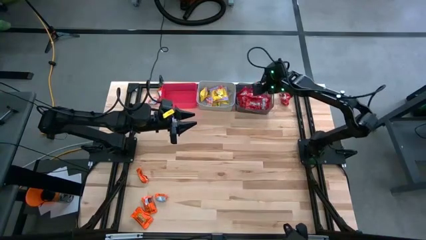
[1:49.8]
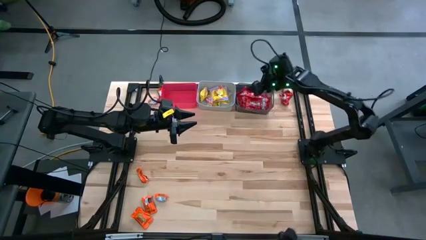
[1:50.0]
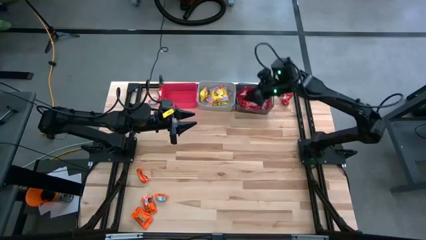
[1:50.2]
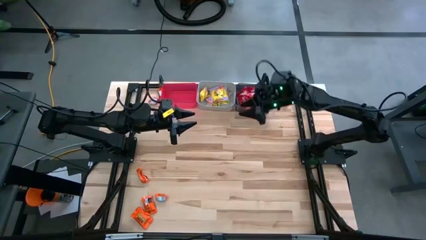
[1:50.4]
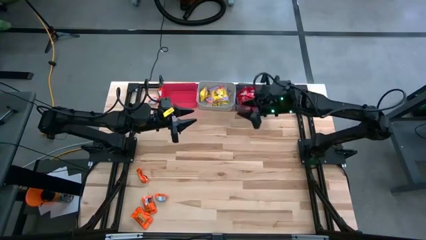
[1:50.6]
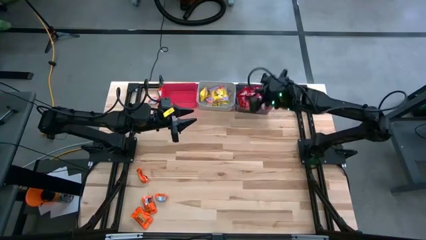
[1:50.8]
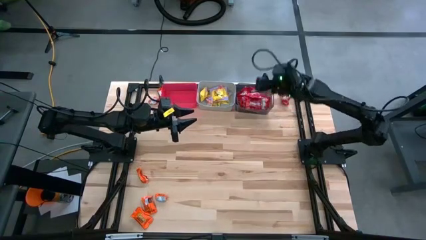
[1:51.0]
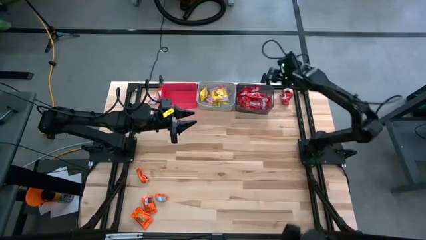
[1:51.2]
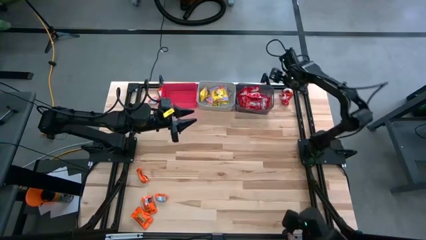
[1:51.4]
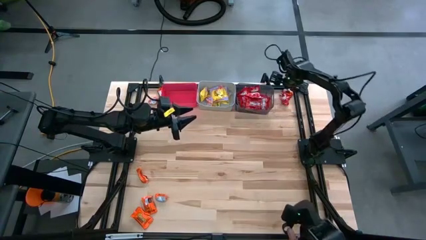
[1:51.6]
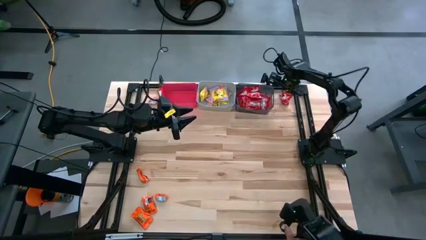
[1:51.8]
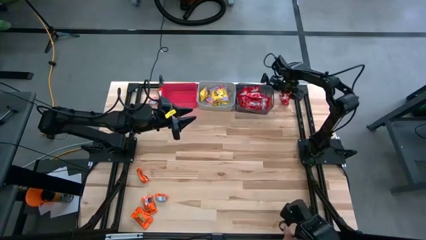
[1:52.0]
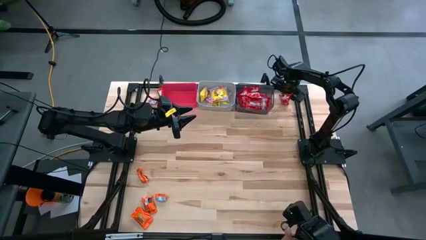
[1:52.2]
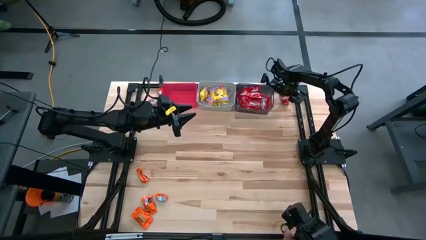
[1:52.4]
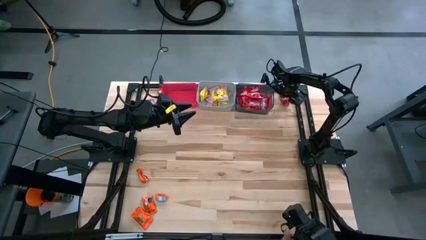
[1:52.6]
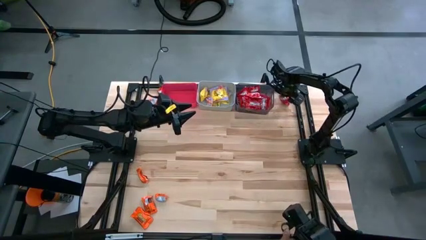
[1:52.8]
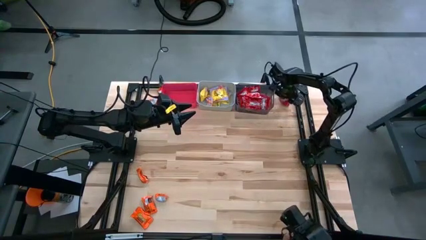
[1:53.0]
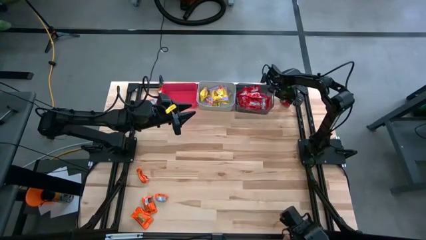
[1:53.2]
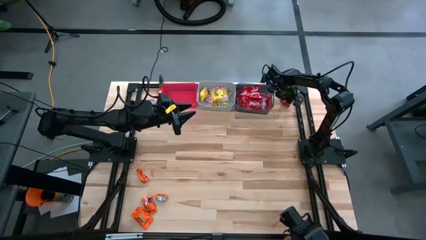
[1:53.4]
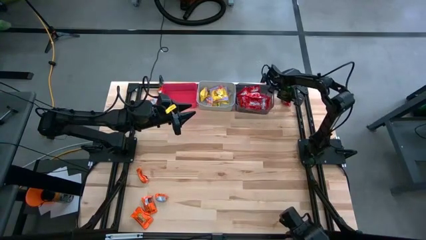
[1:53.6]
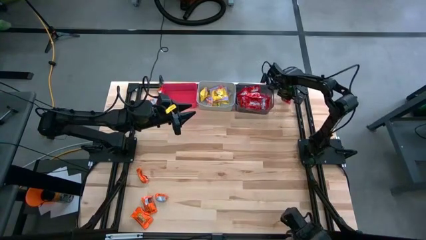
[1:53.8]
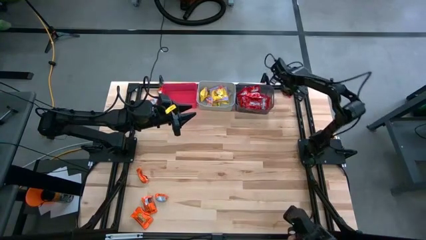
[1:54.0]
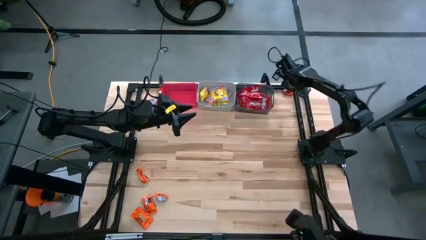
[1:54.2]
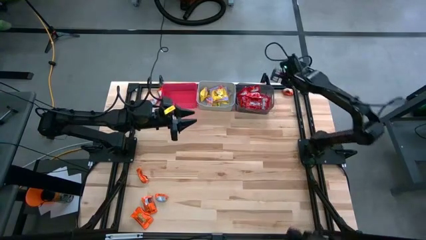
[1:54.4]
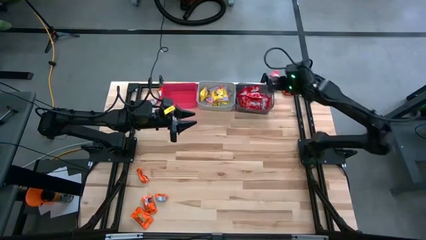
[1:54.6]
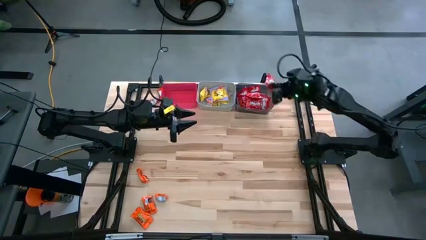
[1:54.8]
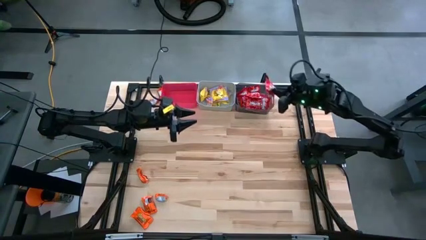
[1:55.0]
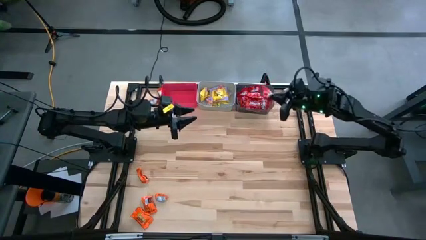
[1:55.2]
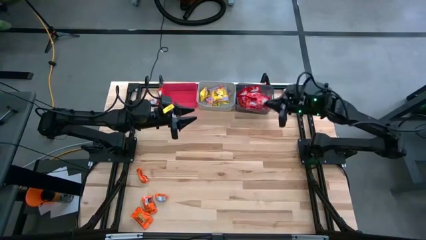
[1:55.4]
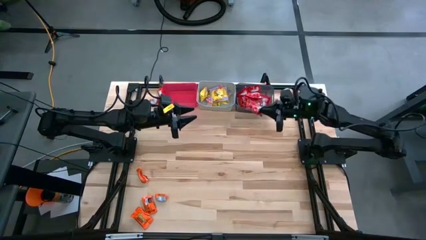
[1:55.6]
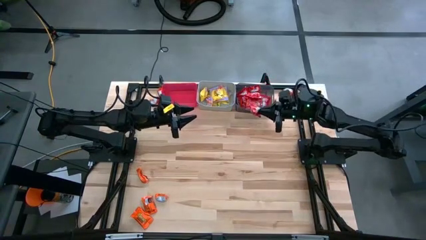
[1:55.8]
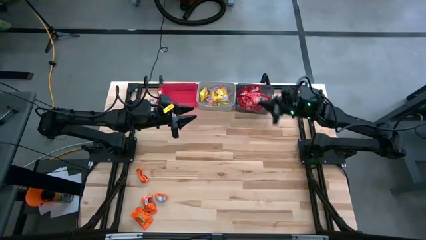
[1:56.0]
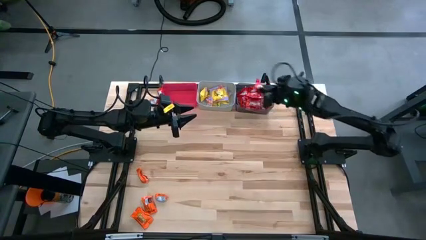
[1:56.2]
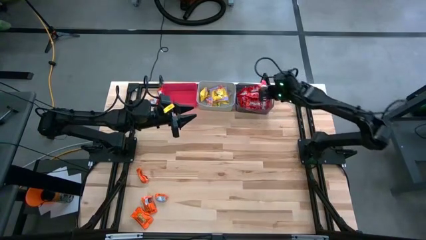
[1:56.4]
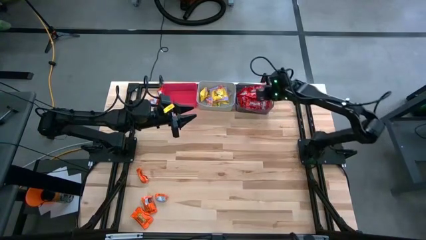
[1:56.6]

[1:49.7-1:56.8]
Task: Sort candy
Put the red candy into the black bin

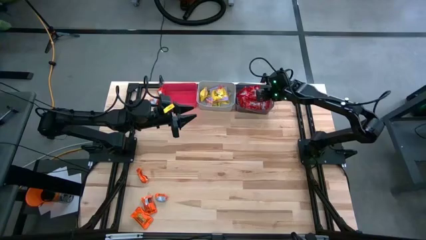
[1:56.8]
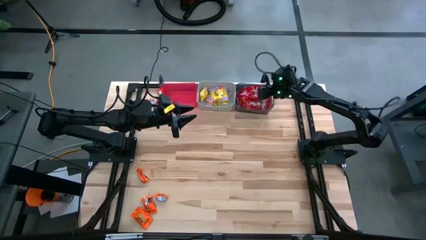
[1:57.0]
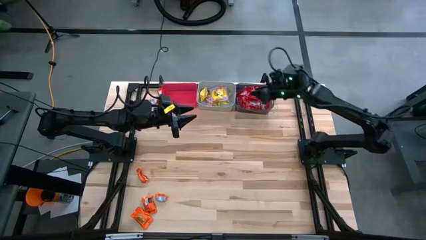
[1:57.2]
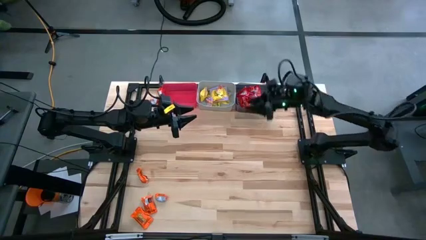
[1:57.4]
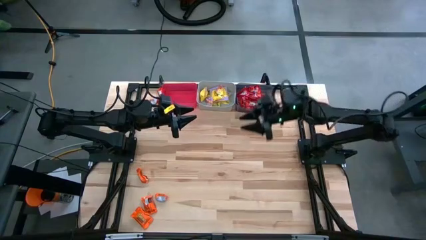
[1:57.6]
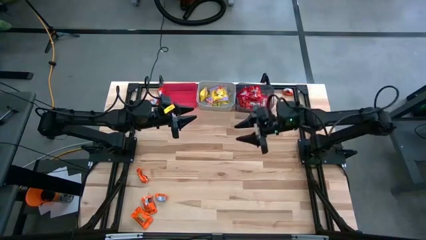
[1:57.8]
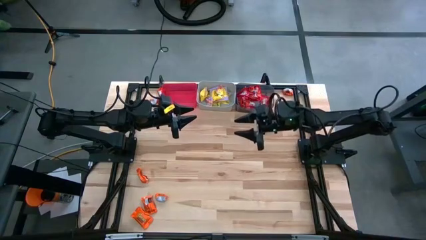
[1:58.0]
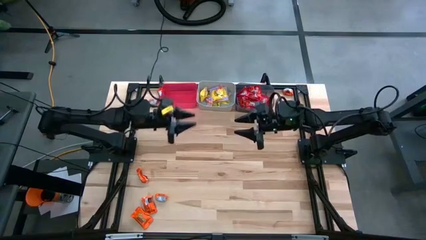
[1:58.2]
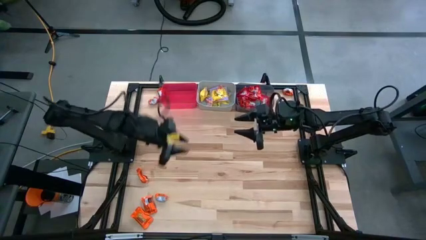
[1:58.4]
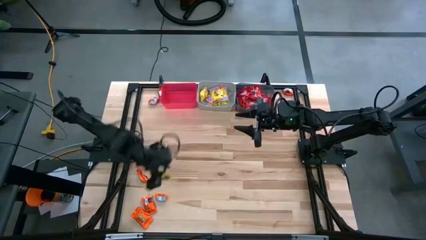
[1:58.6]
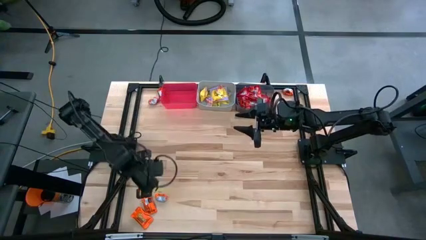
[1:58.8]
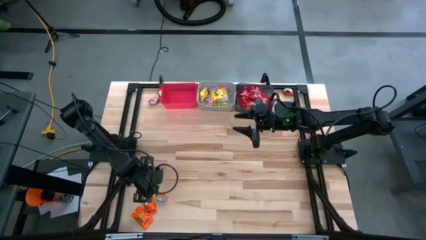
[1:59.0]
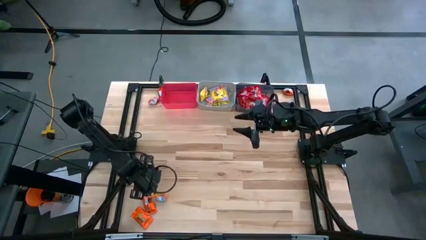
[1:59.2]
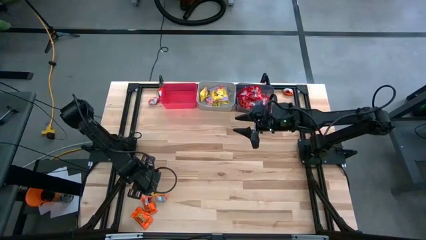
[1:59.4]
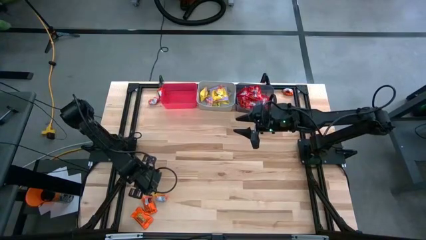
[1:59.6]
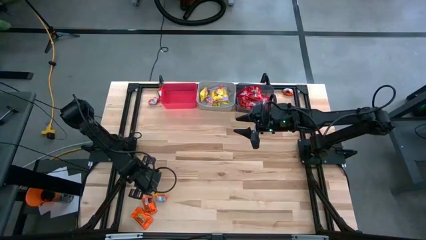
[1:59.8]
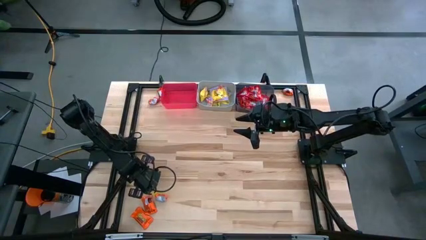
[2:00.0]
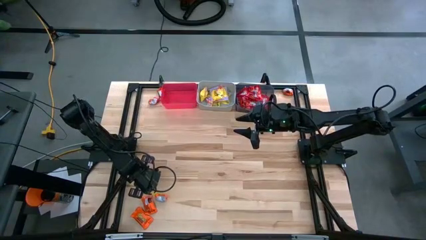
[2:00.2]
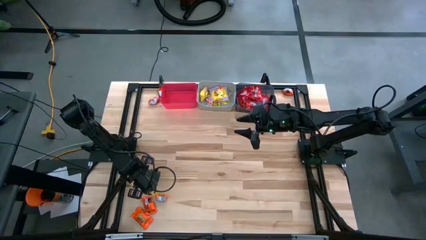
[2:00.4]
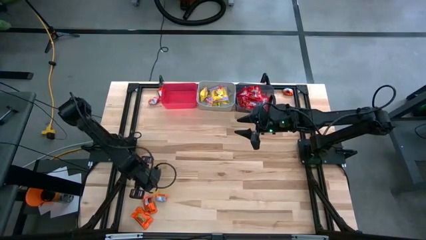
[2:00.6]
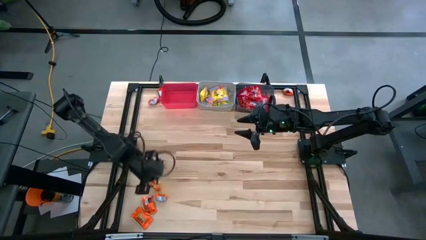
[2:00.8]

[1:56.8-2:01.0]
Put the orange candy into the red bin

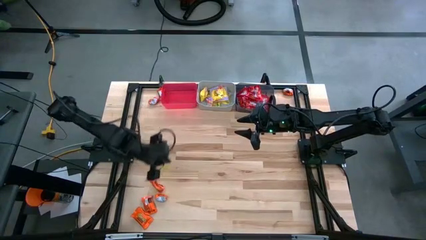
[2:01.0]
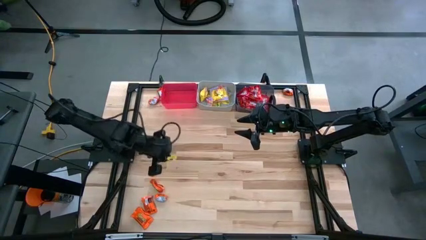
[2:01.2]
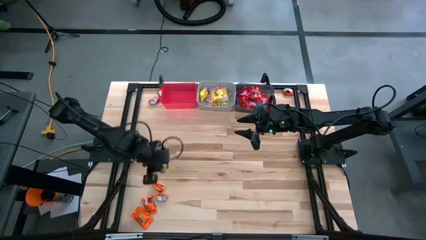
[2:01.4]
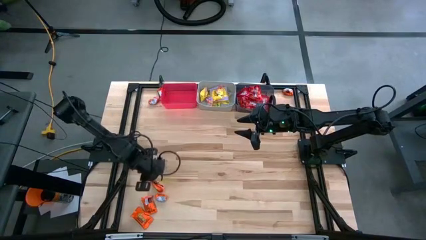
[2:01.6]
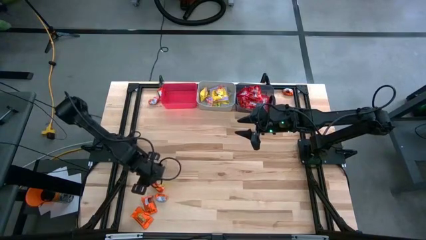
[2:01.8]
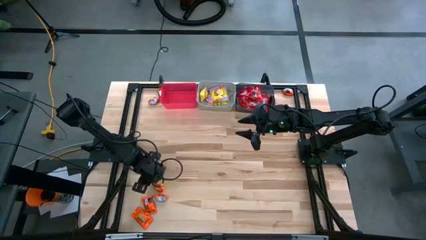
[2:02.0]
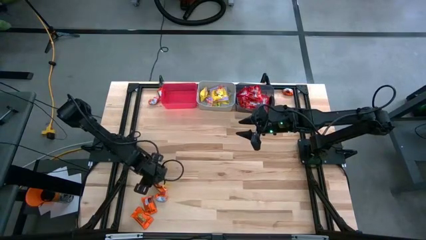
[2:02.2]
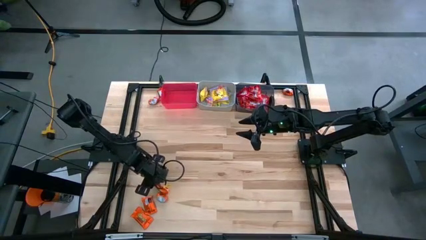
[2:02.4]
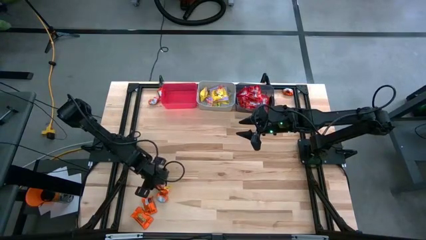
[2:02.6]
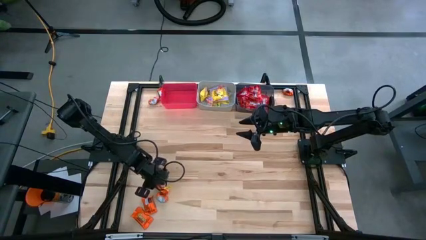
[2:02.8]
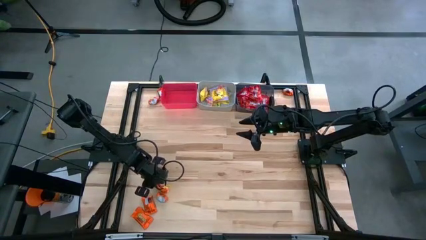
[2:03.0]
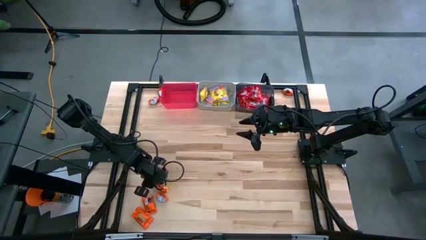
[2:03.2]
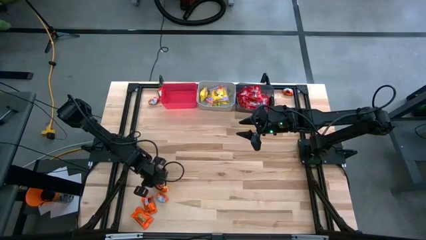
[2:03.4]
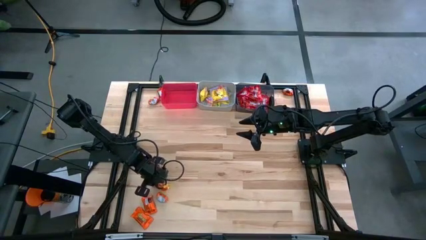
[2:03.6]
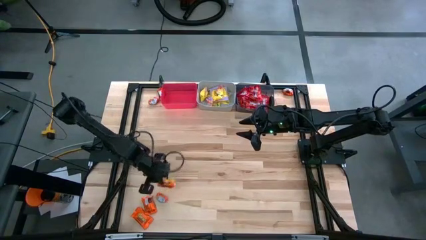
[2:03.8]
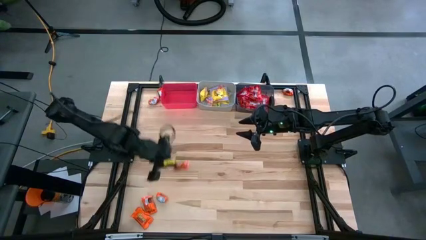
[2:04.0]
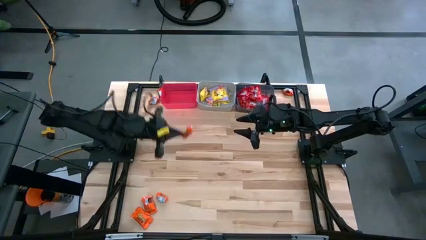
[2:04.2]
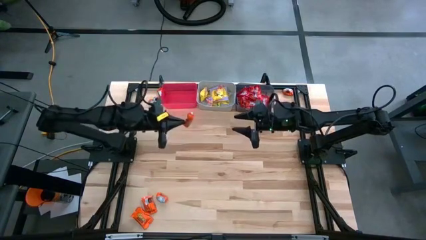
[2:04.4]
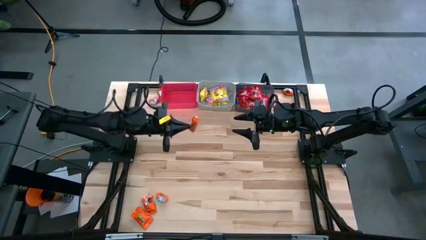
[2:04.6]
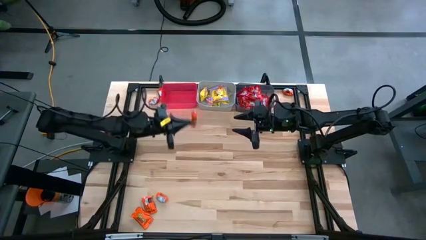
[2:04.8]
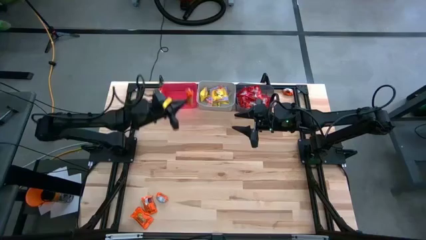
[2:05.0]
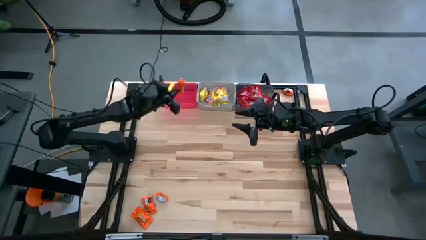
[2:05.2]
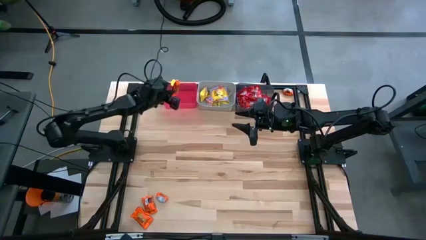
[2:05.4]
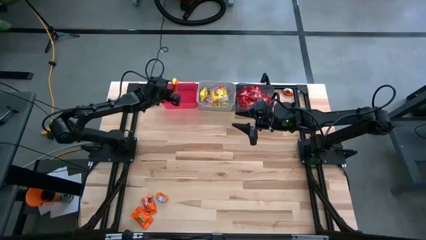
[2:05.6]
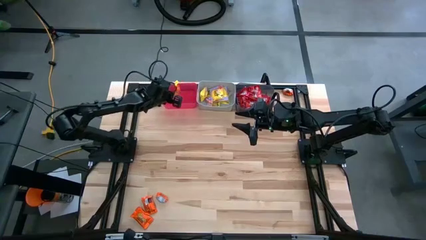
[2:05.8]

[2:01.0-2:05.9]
Put the orange candy into the red bin
